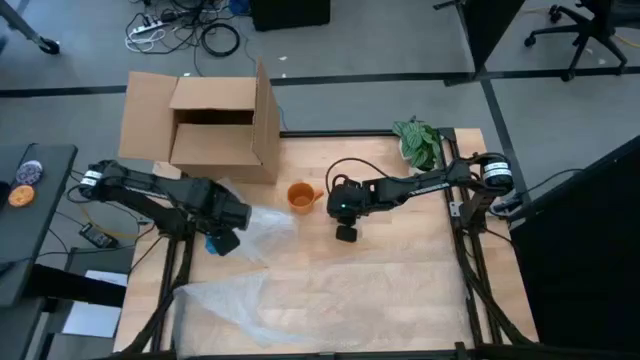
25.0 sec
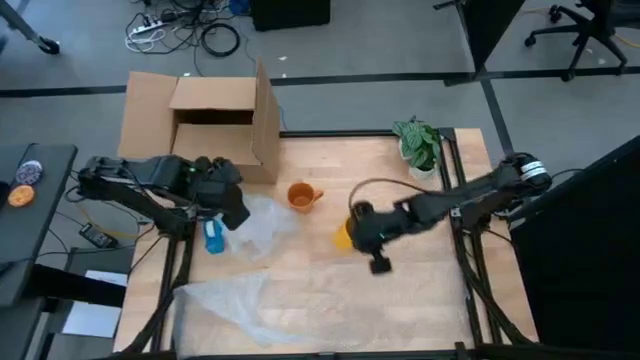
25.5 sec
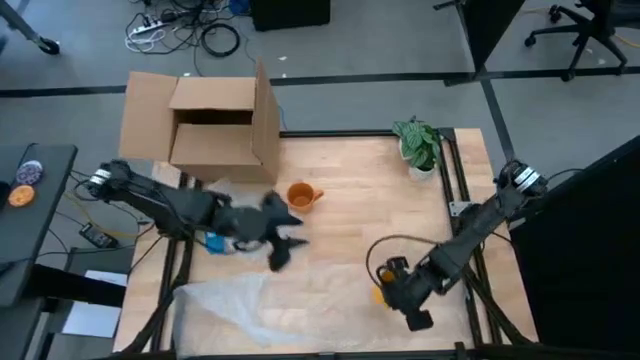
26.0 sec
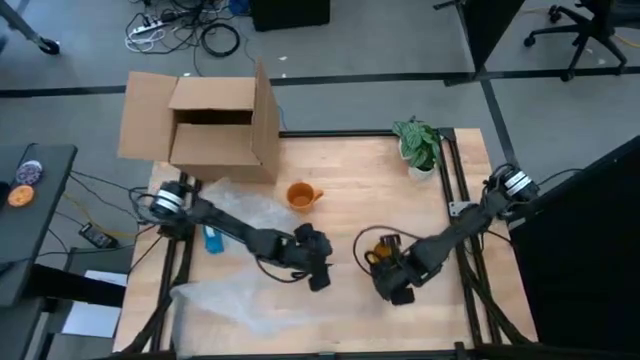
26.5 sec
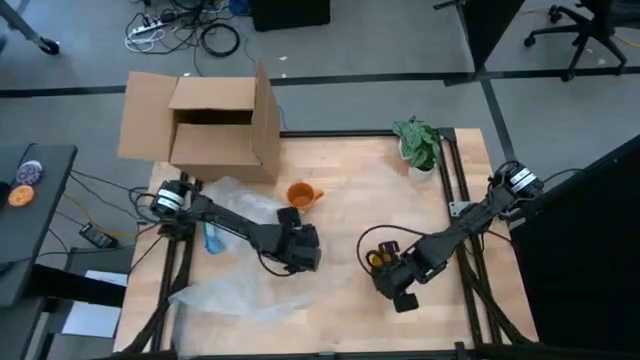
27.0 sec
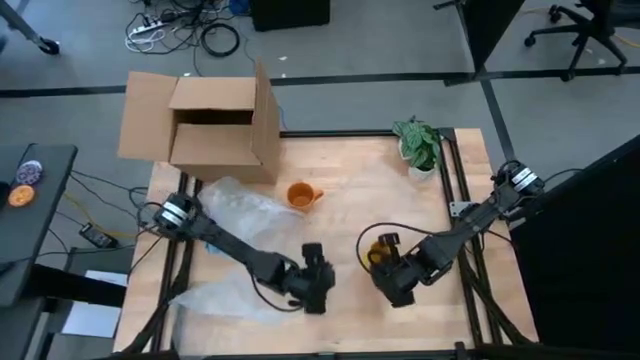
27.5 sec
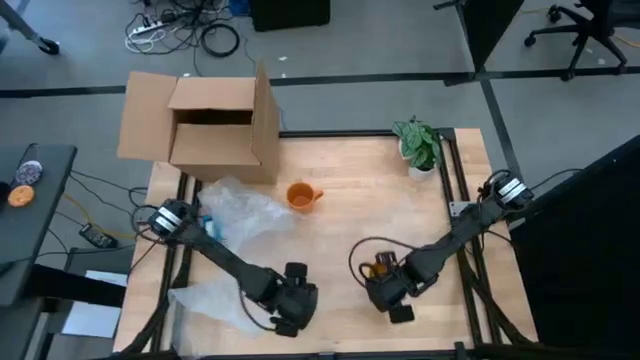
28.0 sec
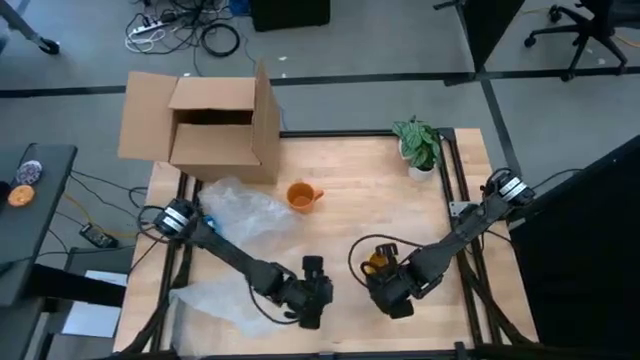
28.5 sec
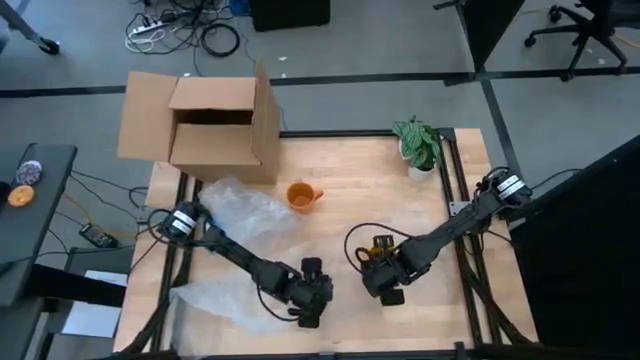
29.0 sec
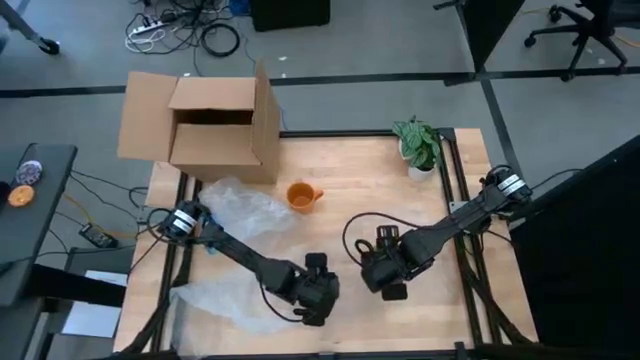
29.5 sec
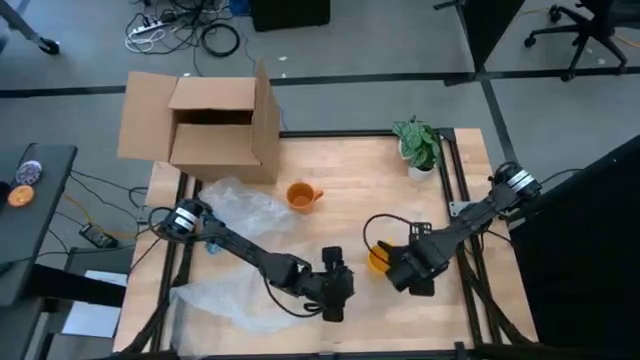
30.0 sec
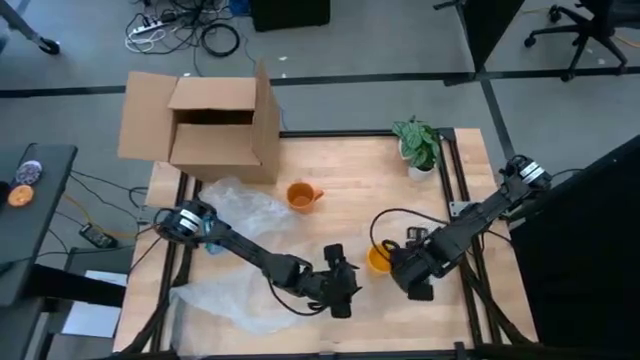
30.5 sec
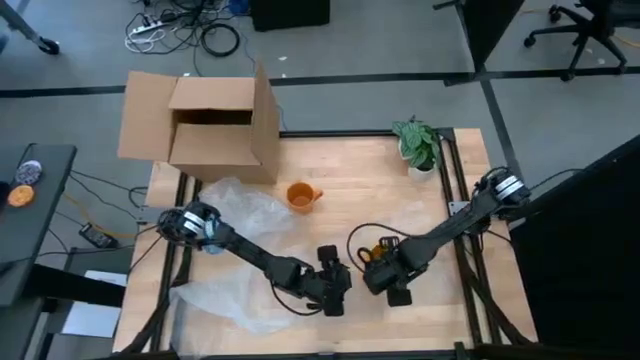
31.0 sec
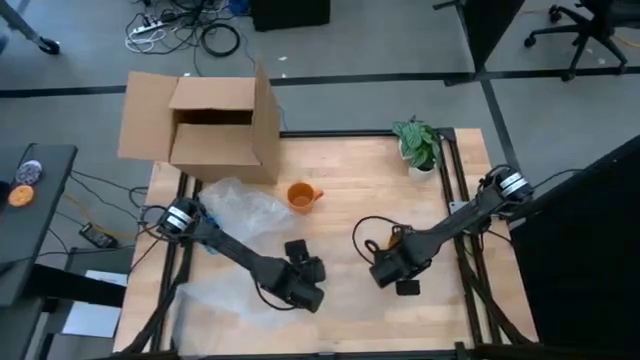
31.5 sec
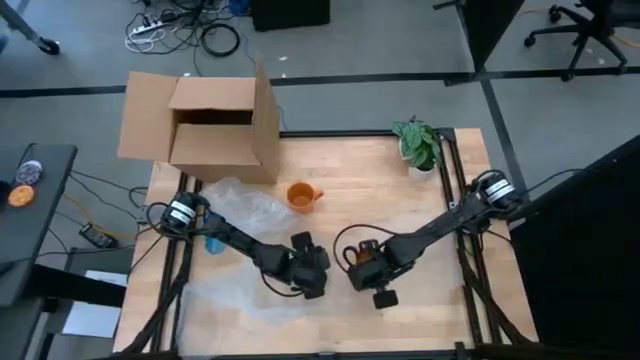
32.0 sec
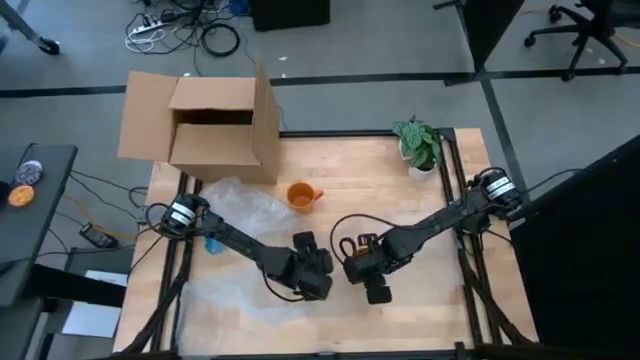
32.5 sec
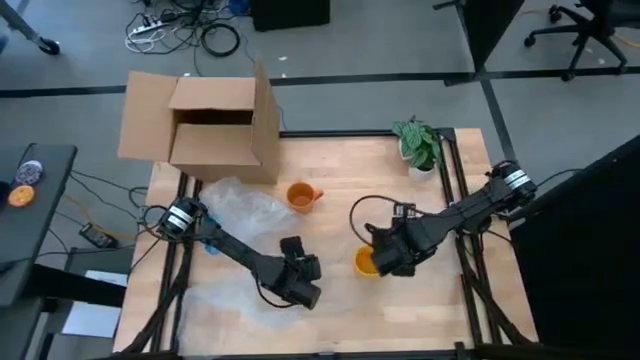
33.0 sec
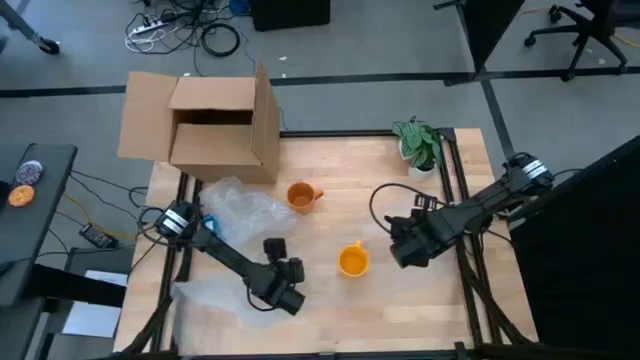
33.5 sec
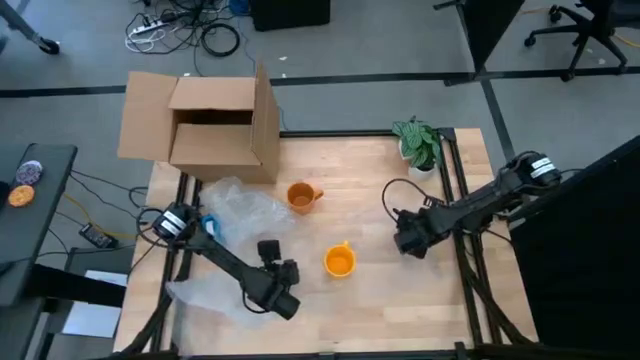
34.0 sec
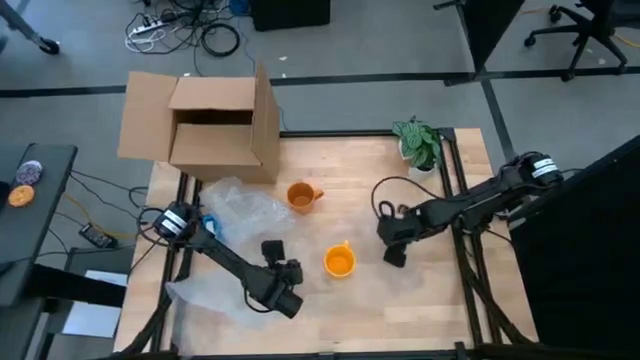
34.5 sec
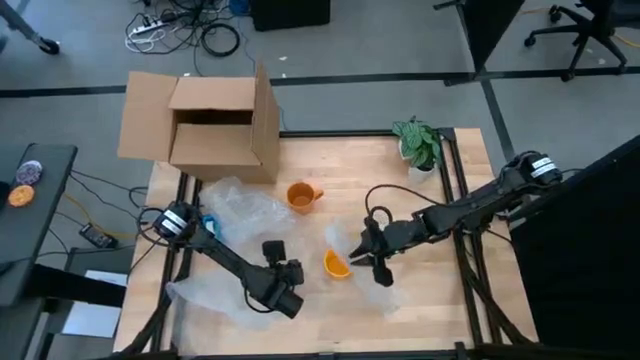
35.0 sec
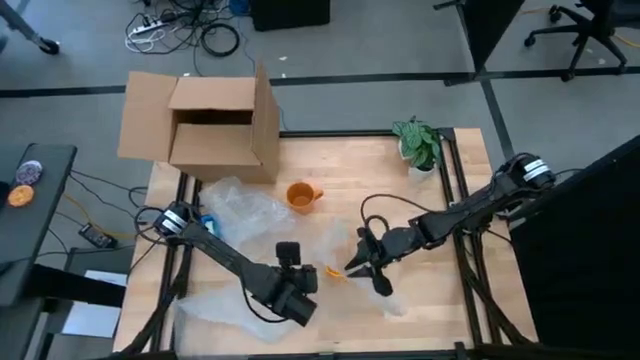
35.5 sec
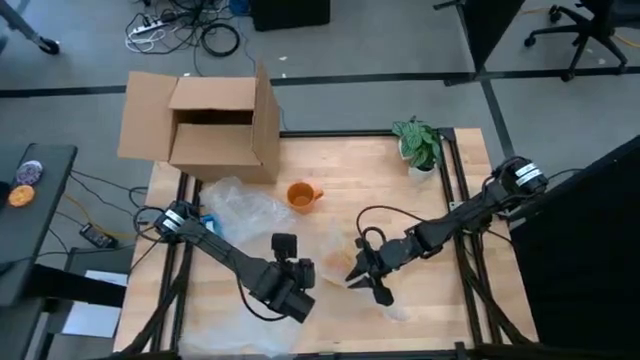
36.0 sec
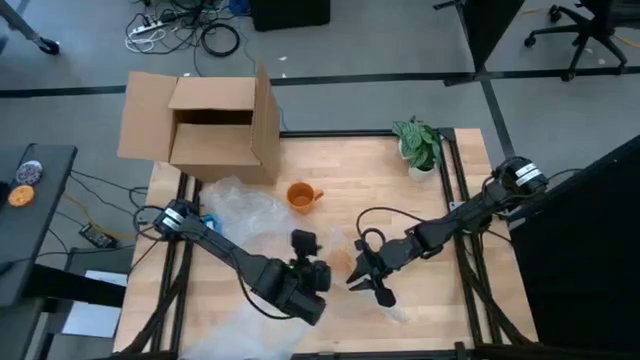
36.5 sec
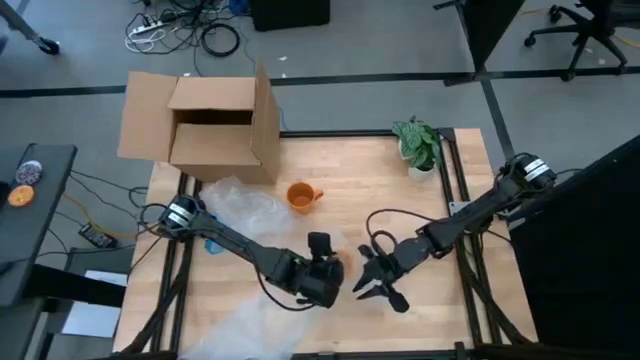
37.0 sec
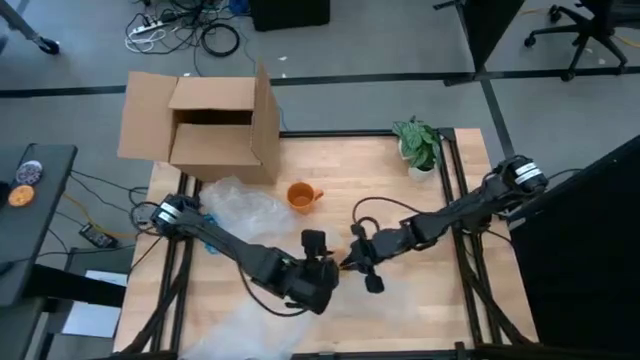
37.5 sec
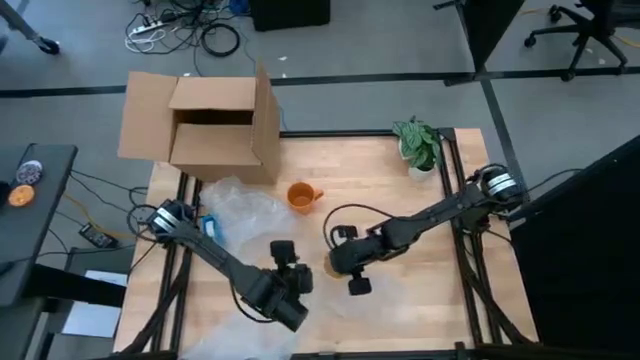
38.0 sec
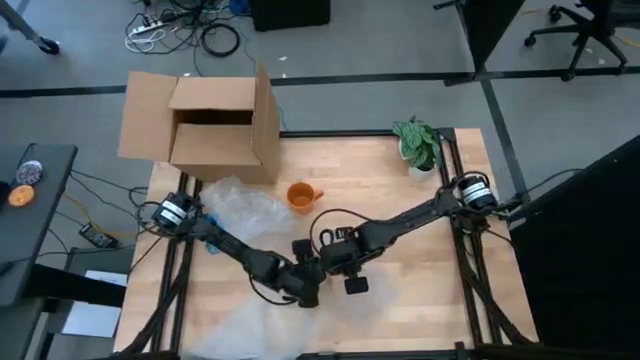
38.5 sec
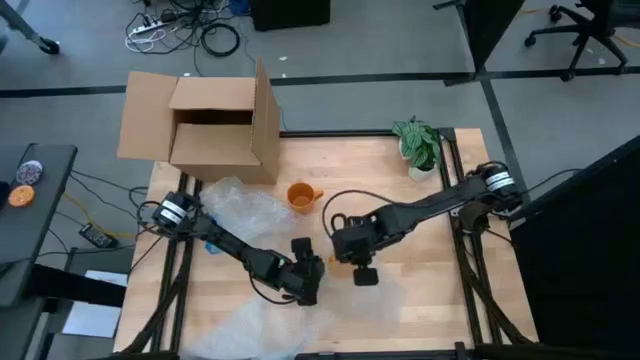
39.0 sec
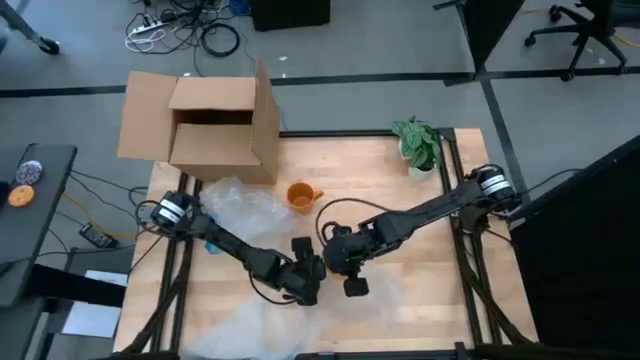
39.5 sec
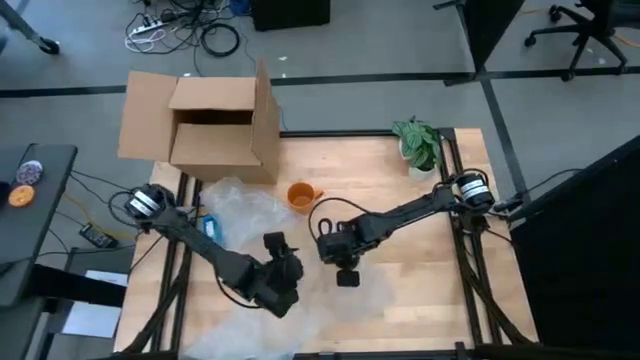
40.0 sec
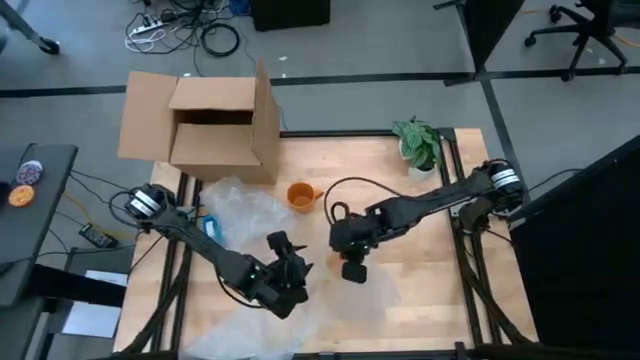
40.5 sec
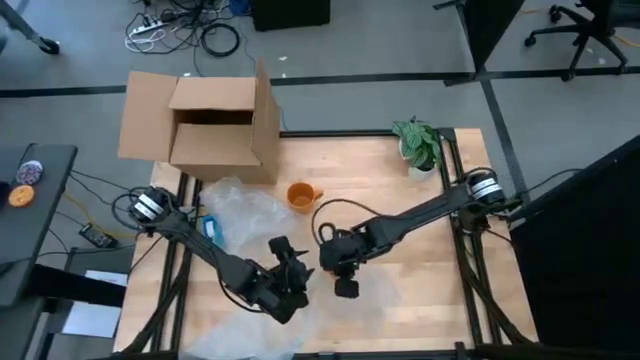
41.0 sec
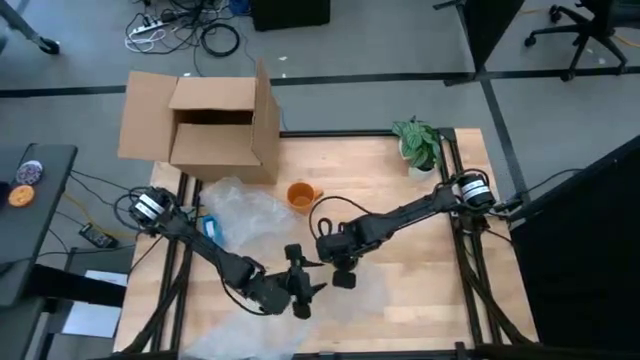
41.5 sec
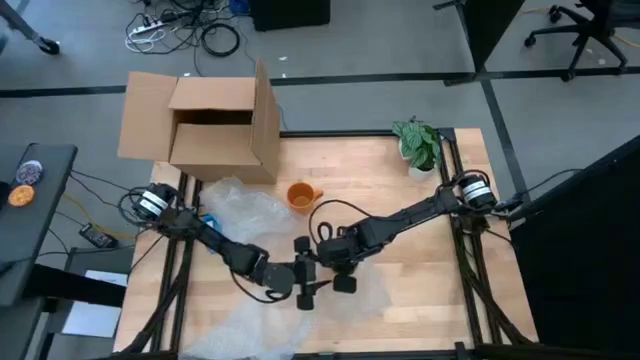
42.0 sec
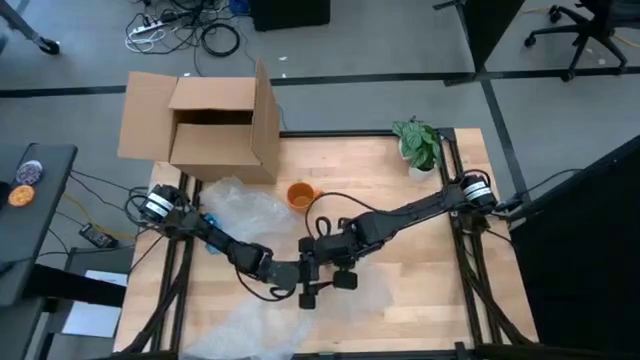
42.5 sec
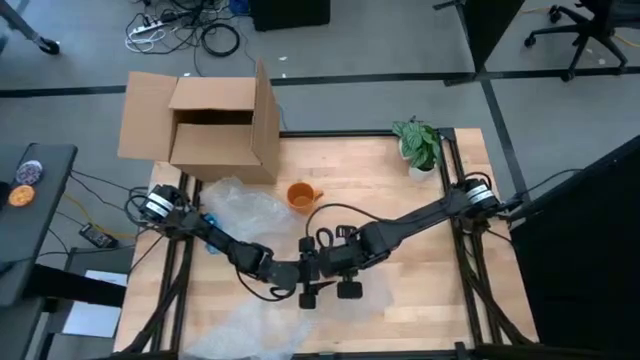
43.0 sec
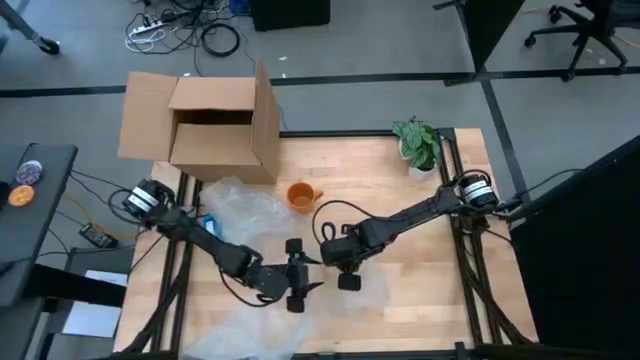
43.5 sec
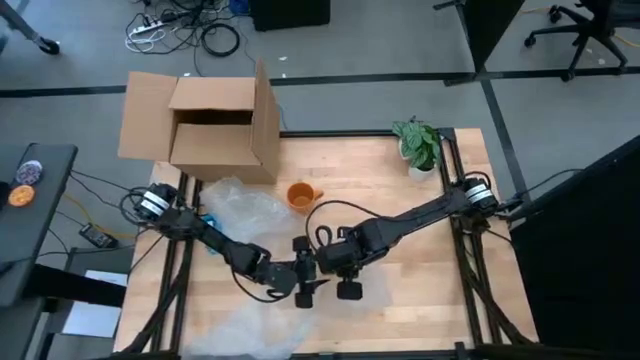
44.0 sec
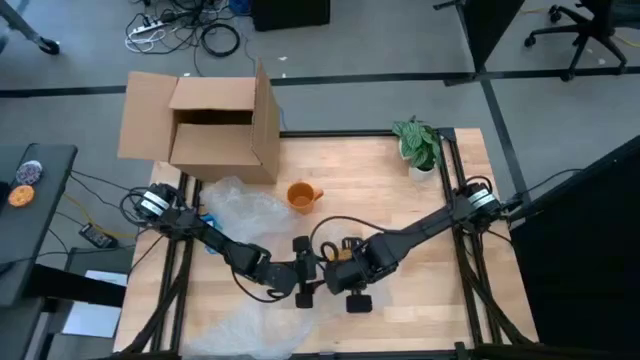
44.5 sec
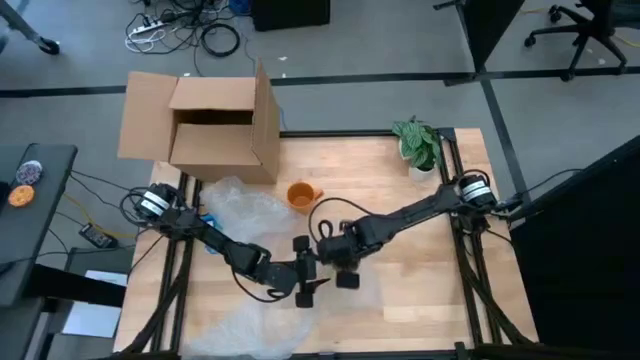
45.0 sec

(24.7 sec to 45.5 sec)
Task: wrap mug
Wrap the yellow mug using the transparent bubble wrap

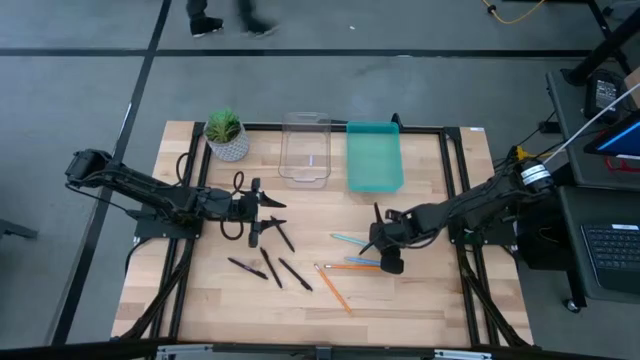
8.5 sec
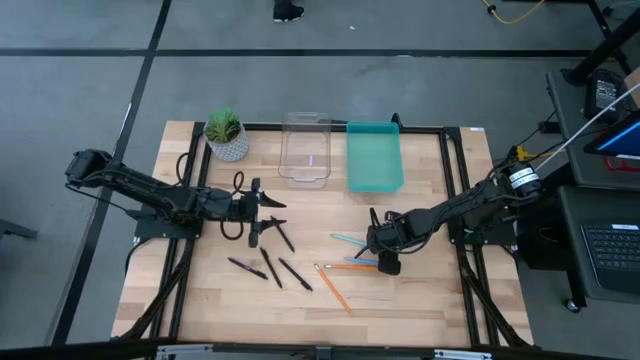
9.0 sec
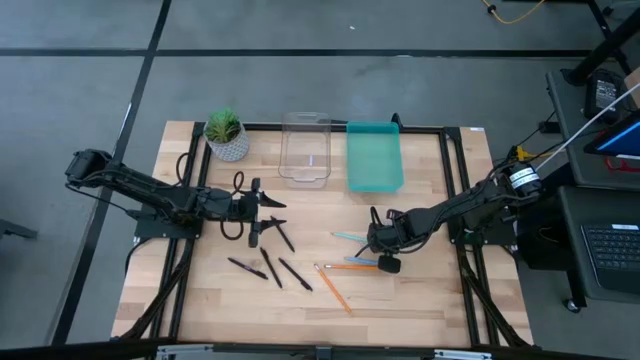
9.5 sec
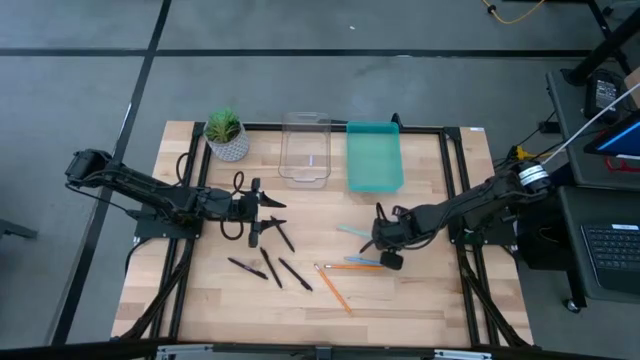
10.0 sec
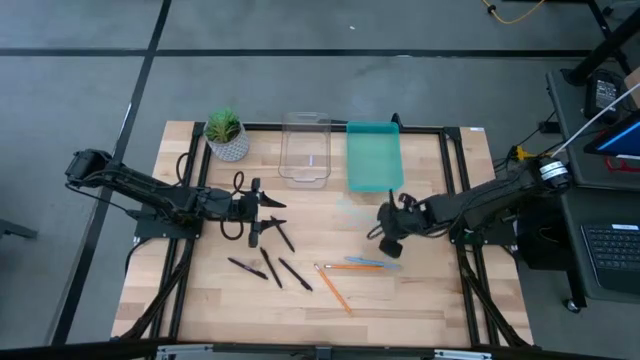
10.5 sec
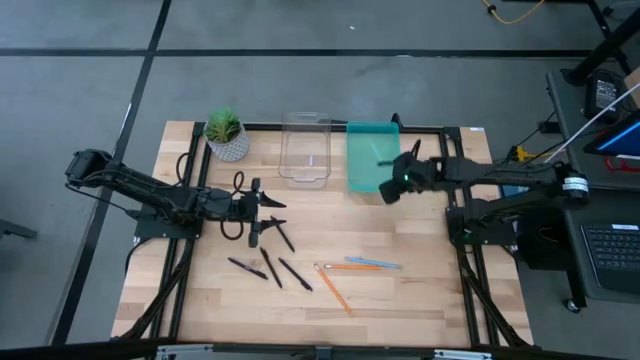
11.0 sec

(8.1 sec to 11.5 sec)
Task: Sort pens & pencils
Put the light blue pencil into the blue bin
